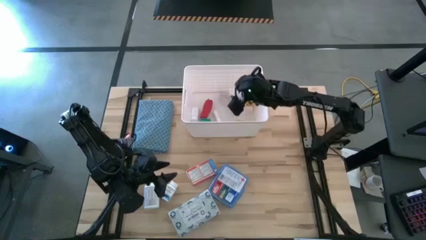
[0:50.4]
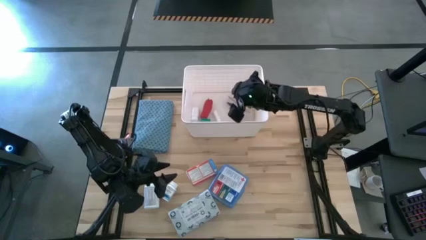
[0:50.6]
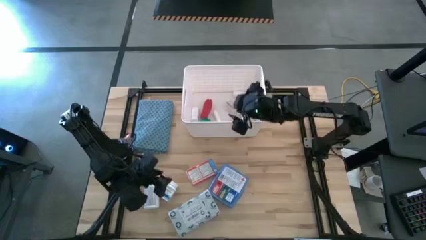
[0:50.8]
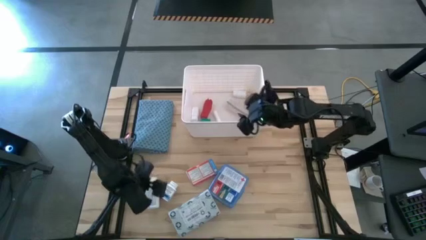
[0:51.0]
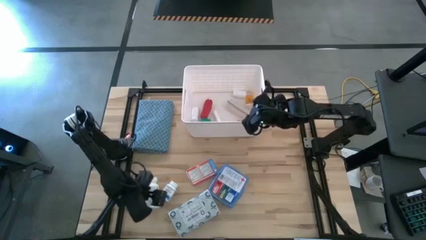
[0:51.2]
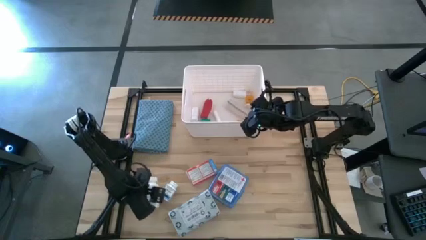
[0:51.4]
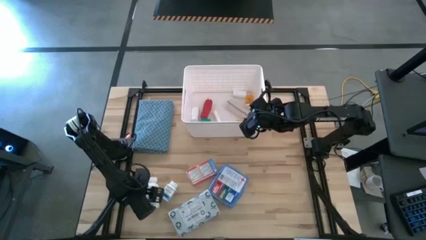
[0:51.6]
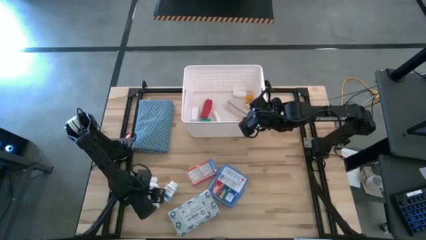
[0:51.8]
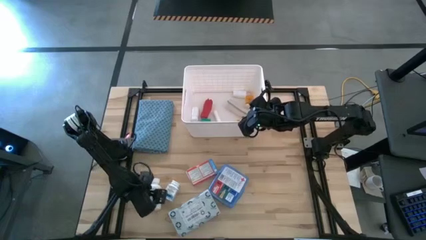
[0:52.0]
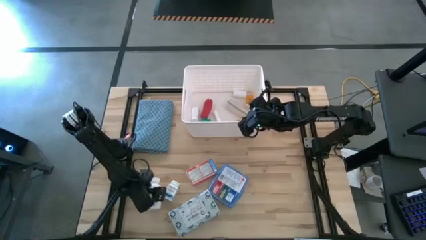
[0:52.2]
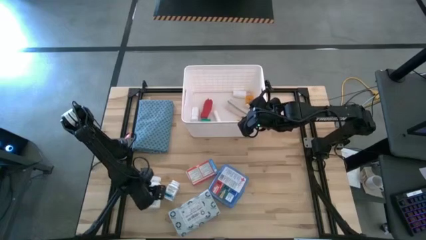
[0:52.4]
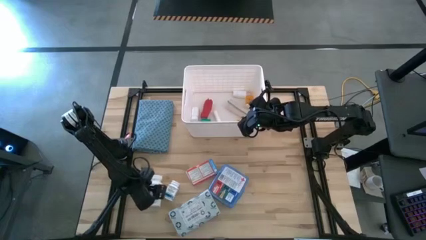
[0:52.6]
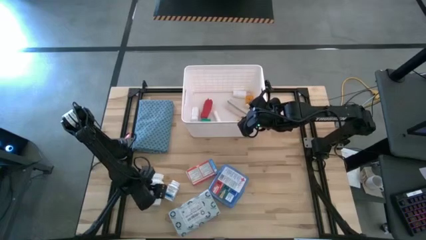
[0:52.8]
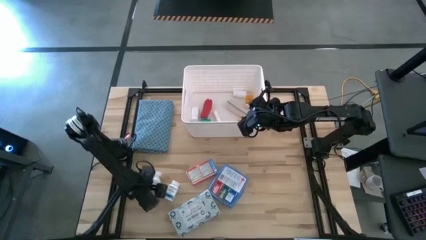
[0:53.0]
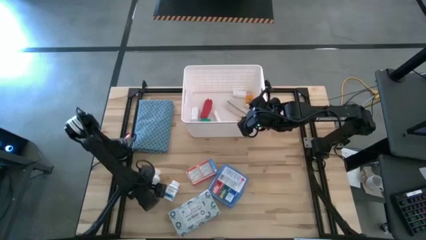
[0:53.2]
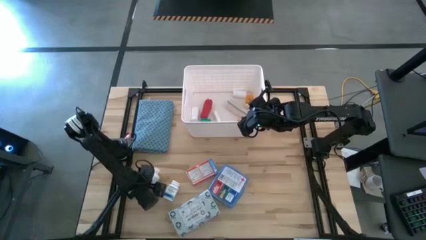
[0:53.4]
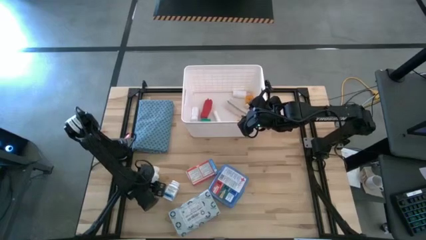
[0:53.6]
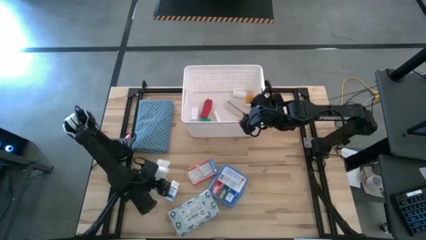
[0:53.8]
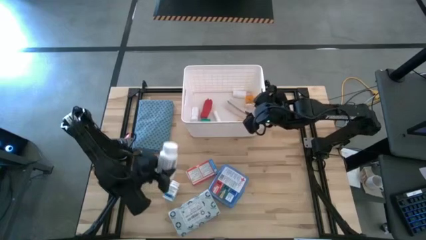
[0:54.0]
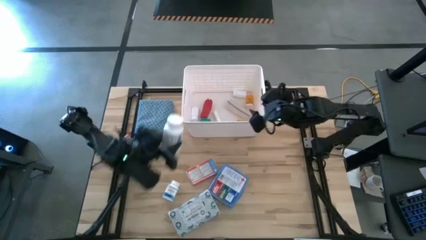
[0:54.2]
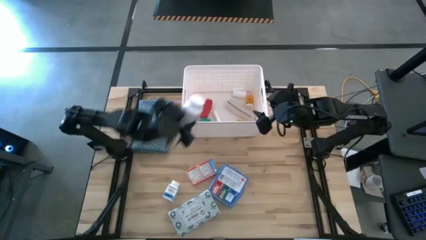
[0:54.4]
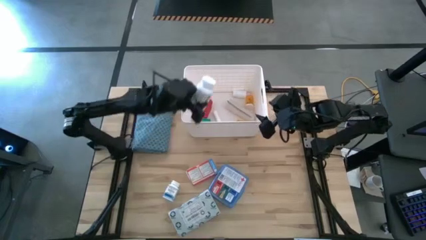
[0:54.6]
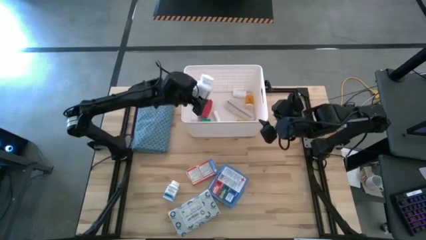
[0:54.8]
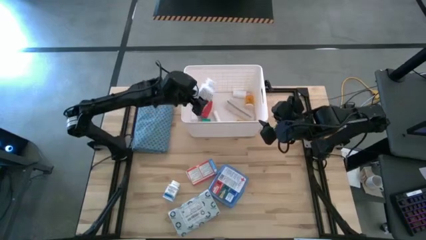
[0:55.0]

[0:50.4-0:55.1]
Task: Pick & place medical supplies in basket/bin
Put the white medicine bottle into the white bin

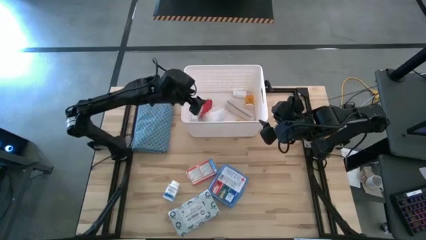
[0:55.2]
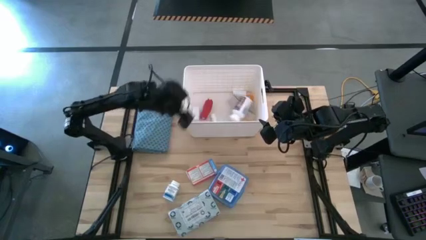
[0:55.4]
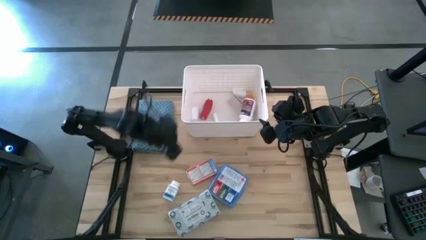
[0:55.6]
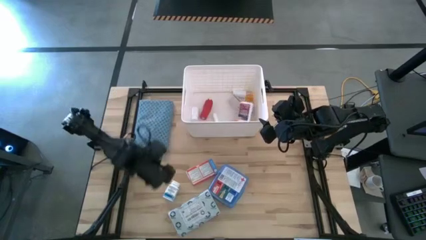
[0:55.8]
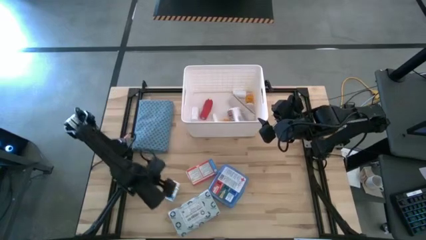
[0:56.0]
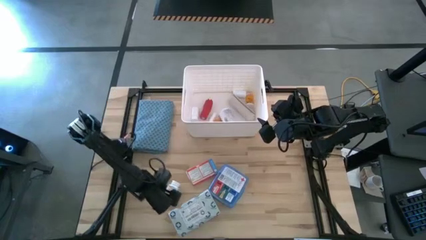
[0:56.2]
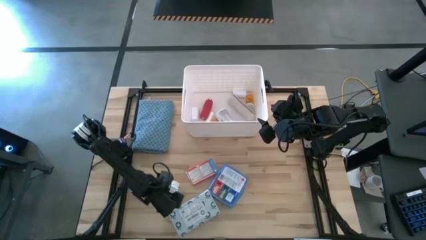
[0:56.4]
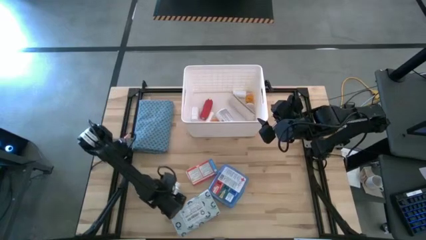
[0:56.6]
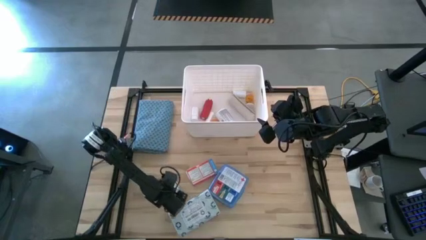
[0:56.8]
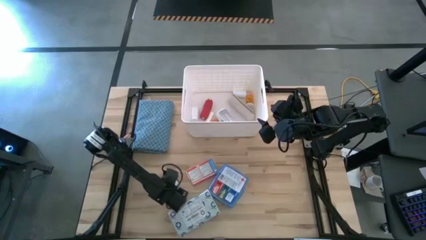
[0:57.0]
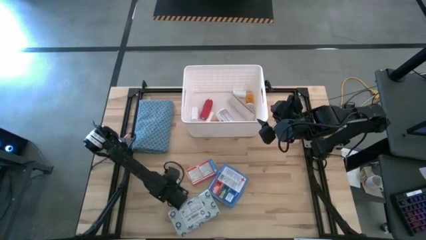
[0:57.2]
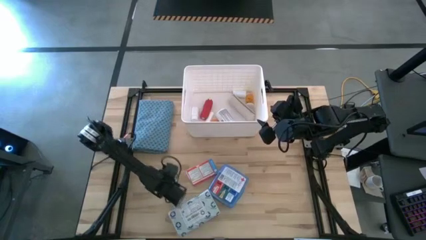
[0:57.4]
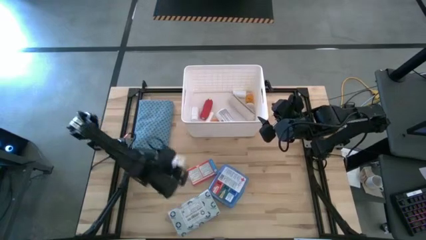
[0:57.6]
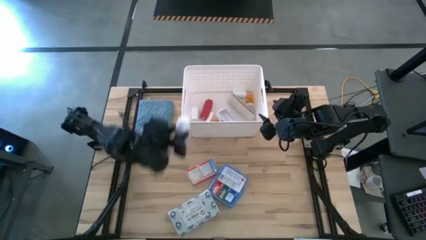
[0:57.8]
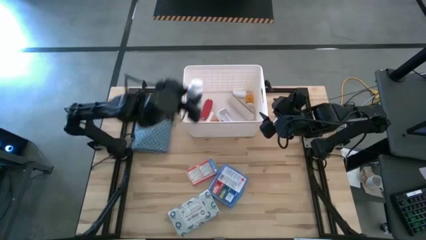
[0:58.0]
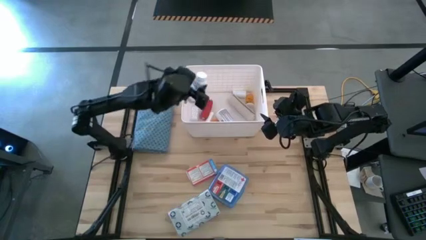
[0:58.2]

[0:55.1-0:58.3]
Put the white and blue medicine bottle into the white bin

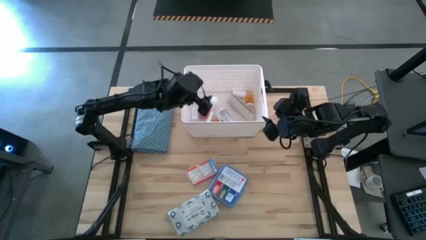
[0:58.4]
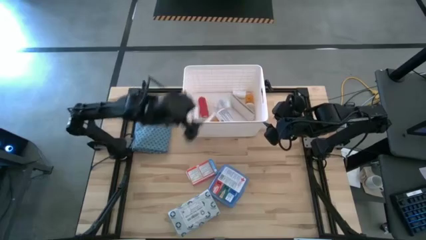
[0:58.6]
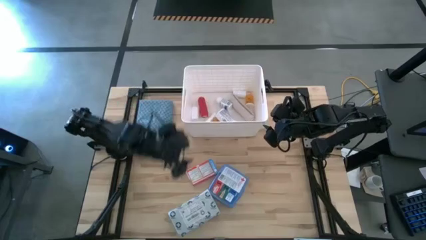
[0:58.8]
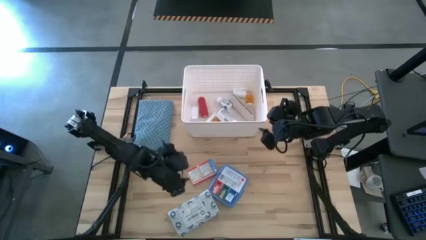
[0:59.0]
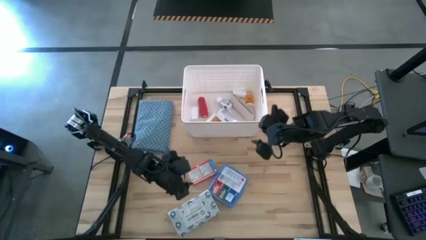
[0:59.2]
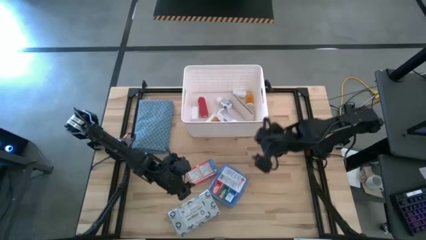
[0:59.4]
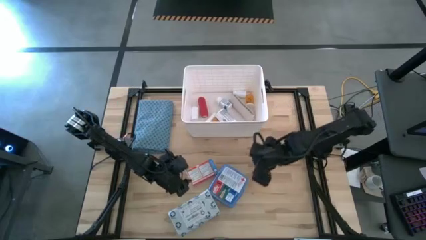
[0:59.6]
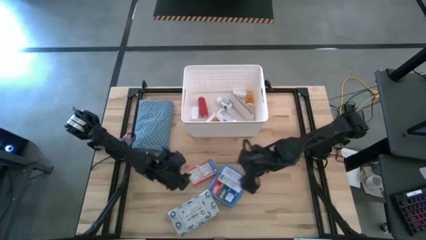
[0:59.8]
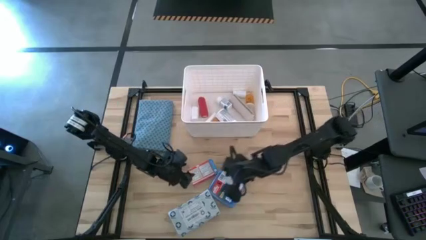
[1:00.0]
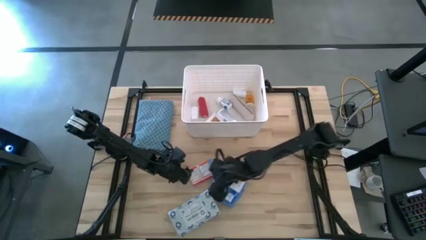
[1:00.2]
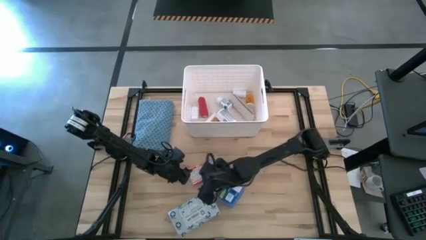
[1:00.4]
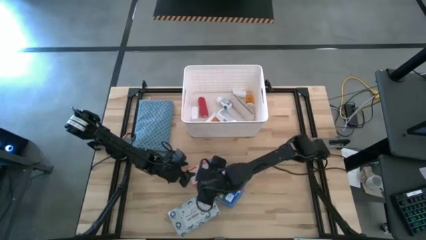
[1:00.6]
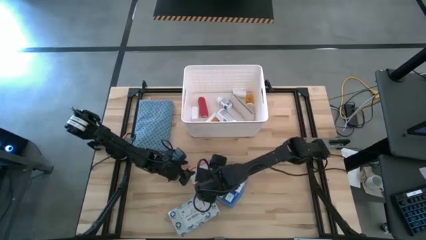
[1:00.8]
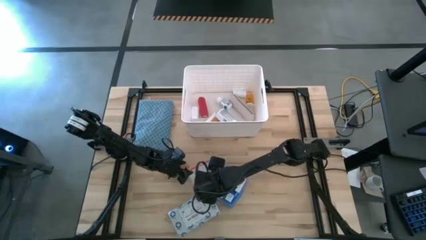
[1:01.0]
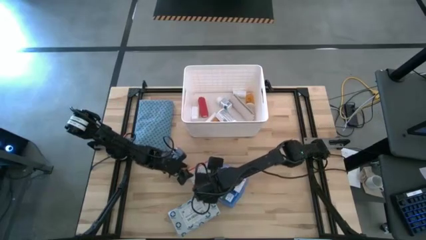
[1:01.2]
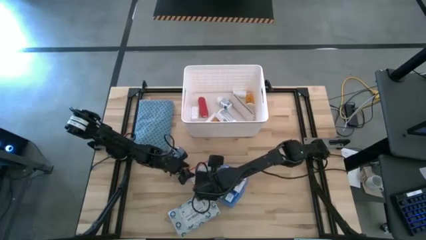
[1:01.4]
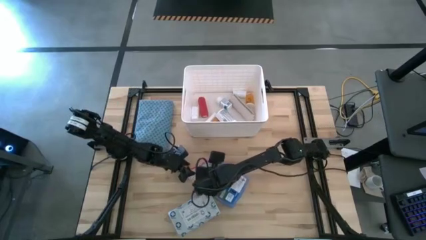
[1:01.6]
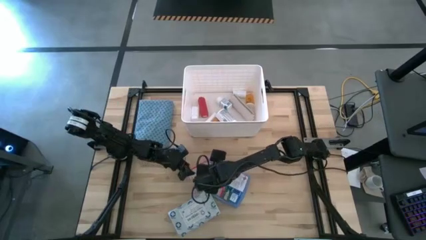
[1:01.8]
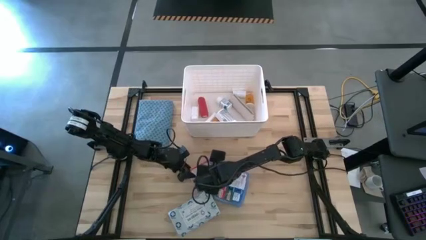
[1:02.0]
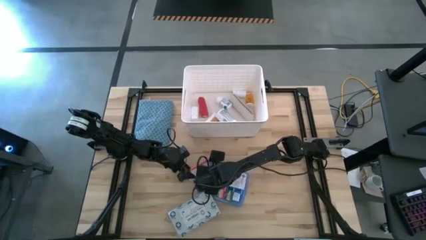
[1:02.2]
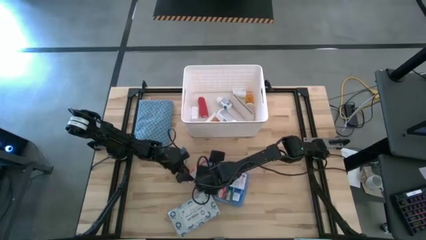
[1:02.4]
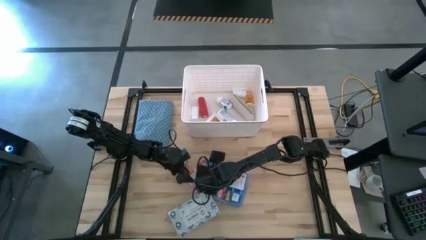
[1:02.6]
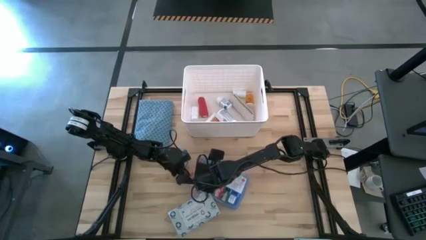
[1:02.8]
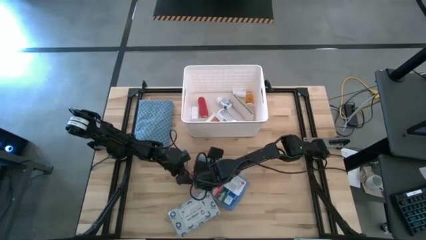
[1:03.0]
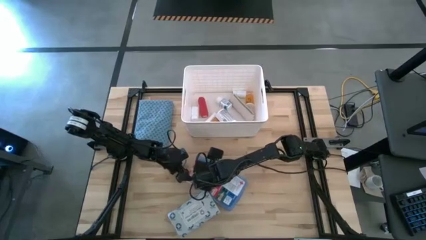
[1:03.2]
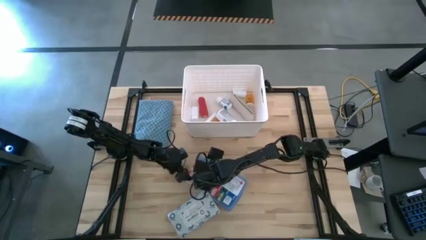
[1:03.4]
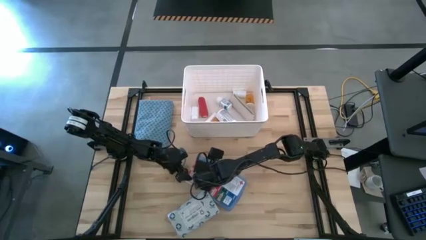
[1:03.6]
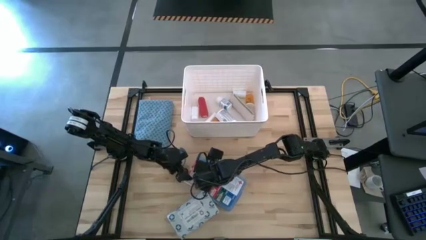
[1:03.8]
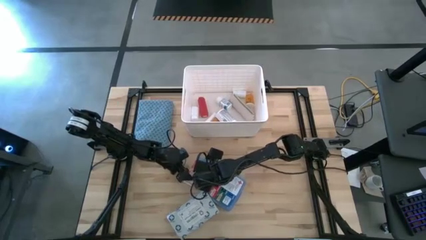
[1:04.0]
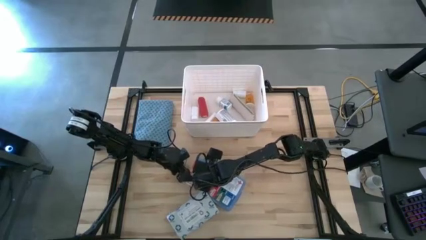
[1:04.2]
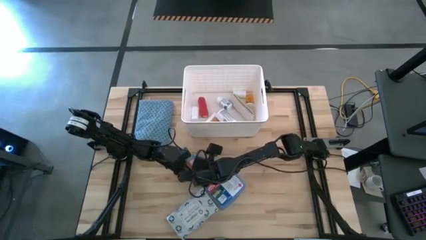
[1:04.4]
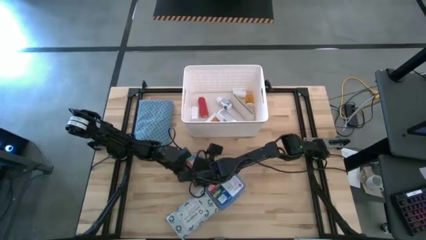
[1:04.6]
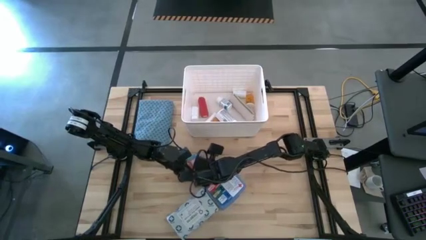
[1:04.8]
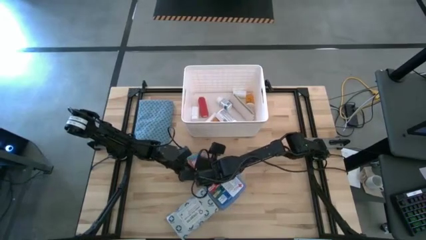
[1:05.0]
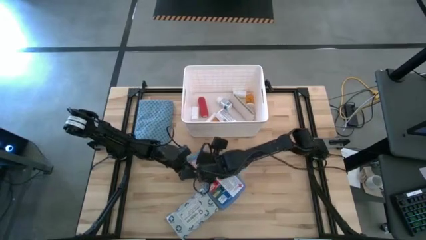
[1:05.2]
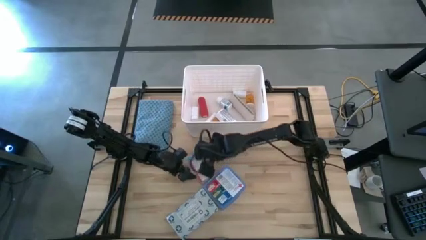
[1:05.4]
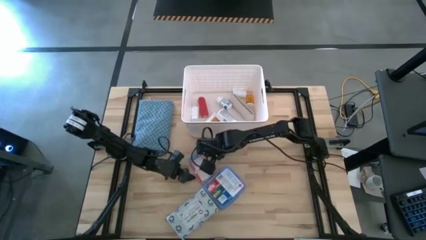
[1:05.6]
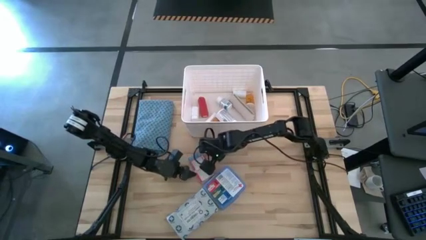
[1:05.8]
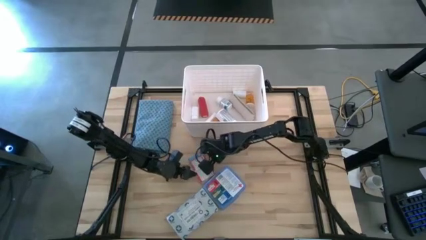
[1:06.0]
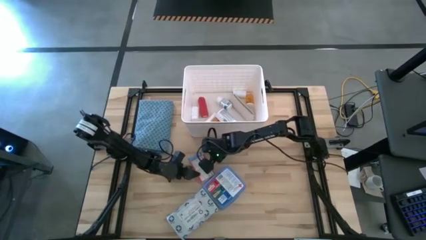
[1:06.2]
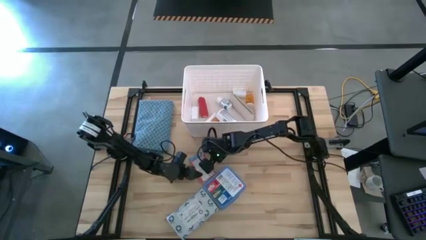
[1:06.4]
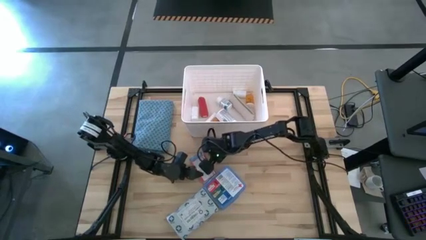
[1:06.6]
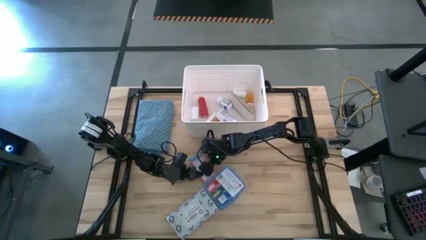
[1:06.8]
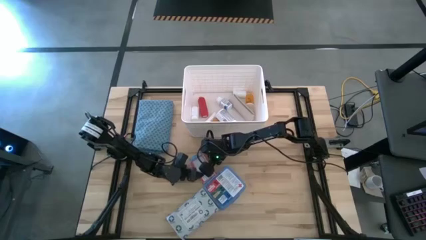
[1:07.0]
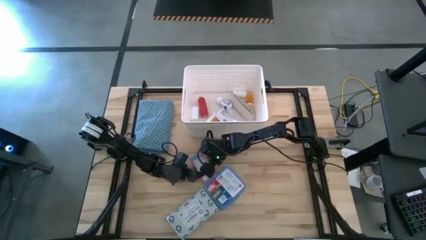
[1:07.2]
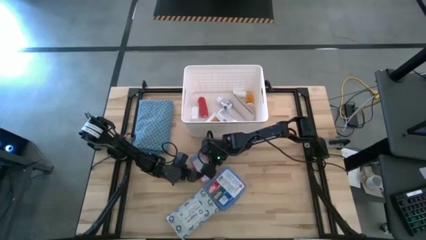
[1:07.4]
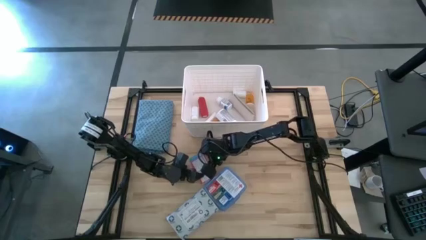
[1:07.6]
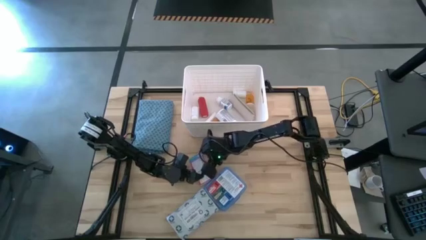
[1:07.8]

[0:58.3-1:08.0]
Put the red medicine box into the white bin
